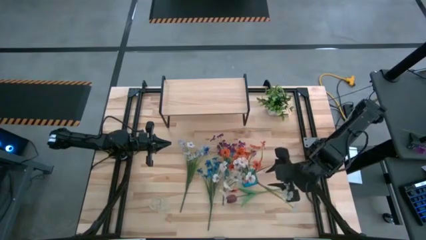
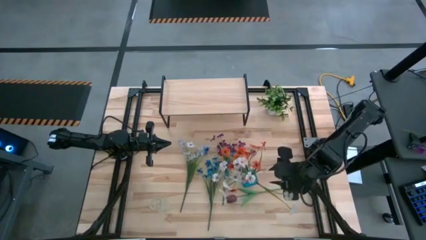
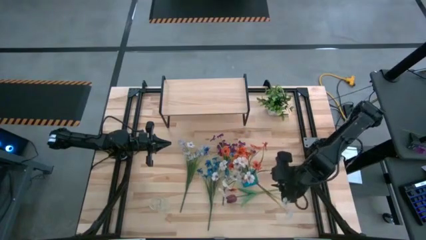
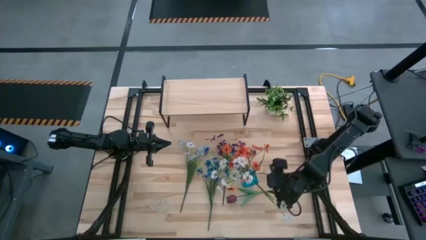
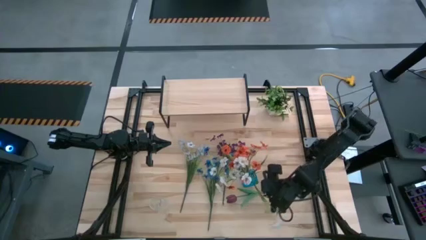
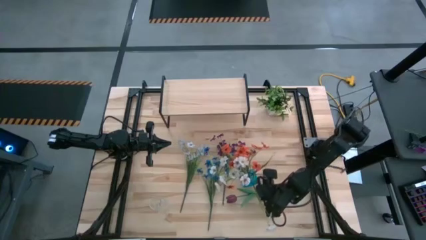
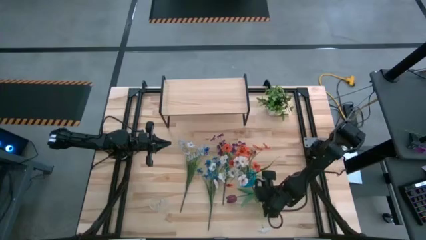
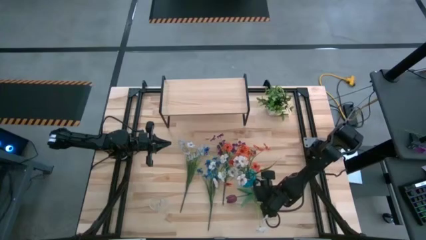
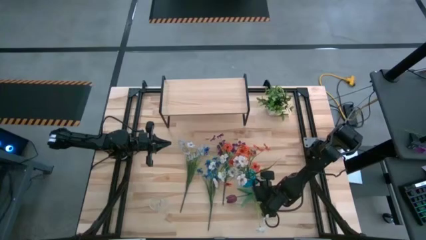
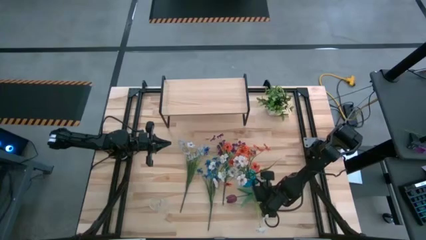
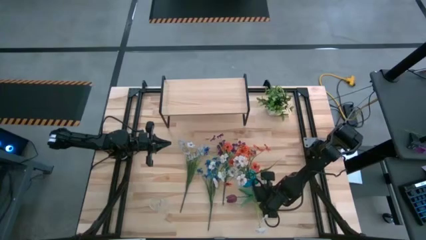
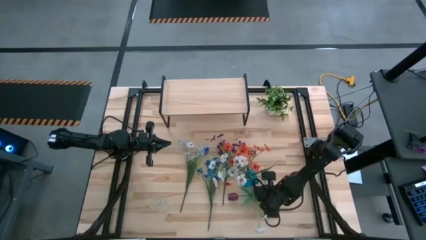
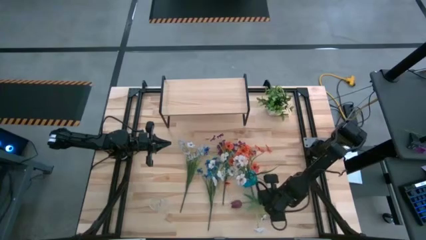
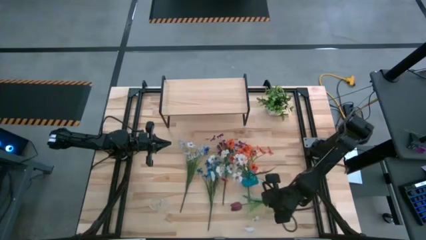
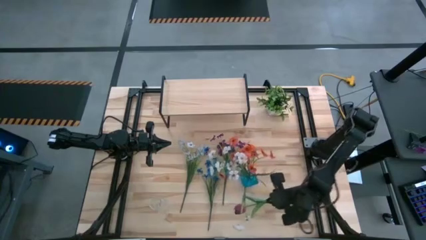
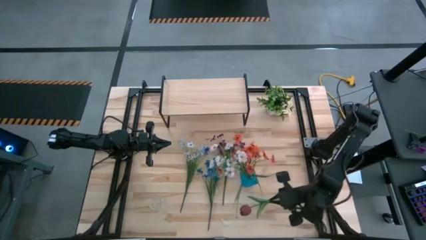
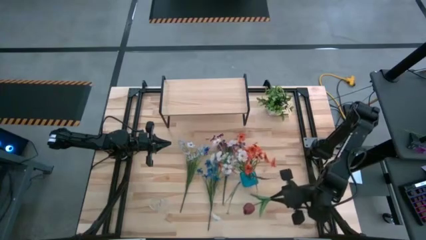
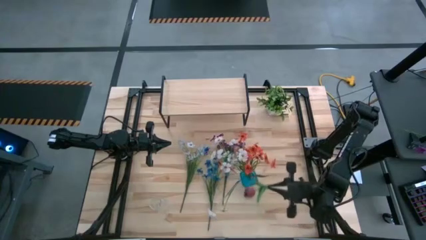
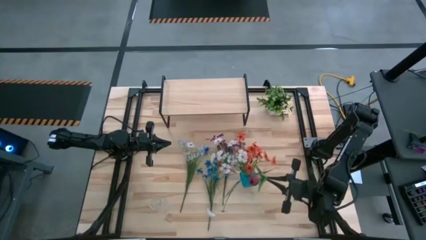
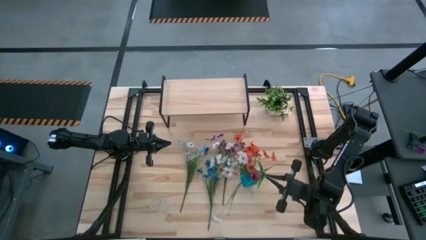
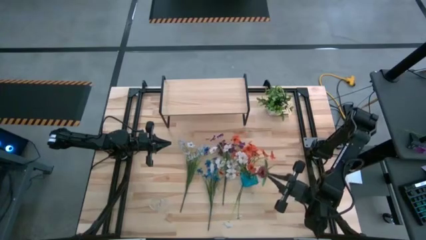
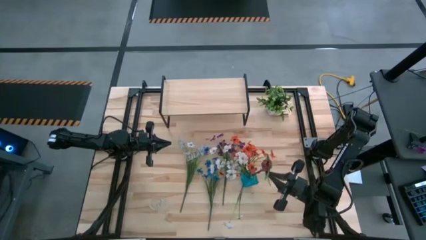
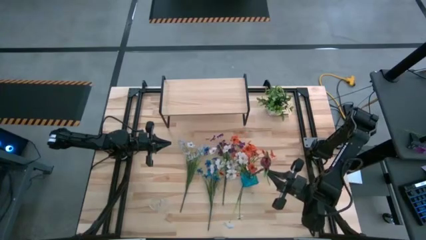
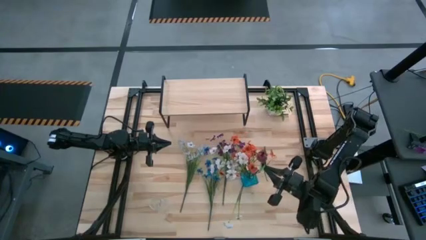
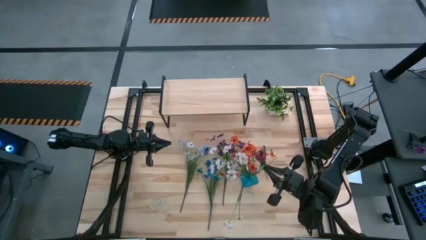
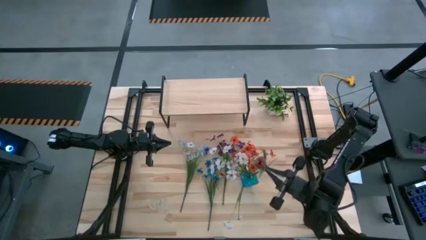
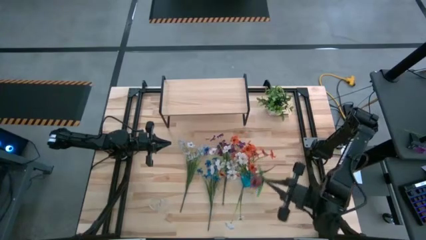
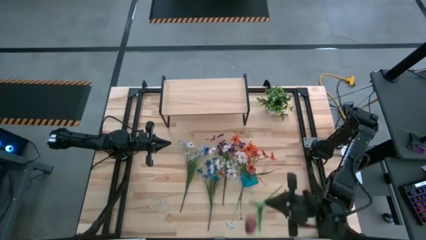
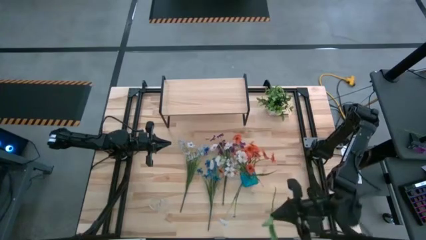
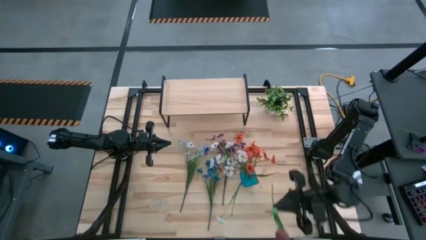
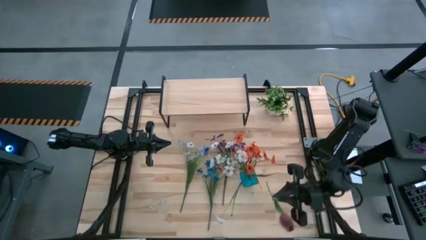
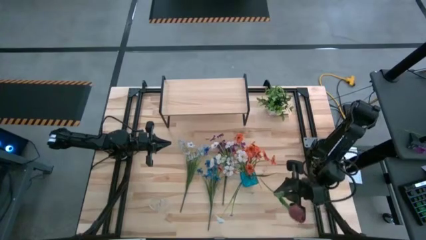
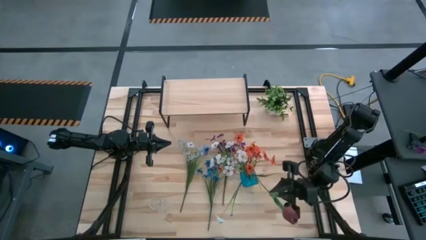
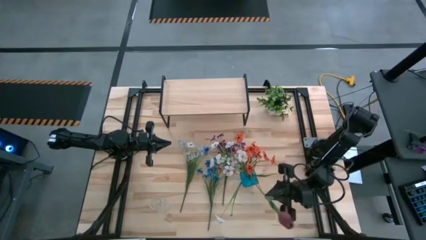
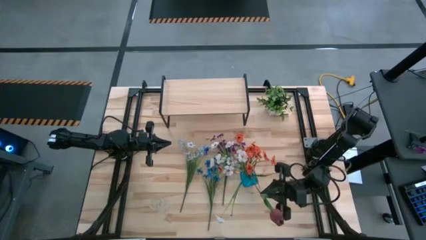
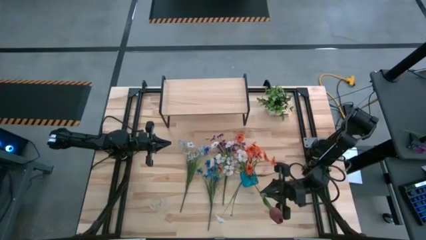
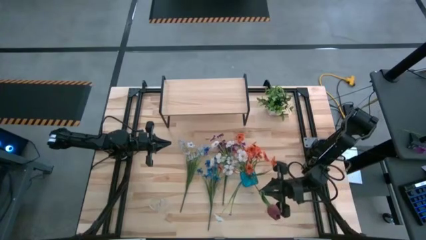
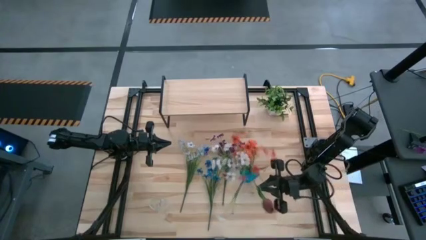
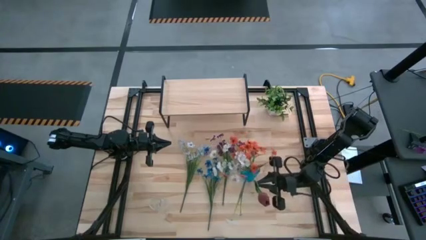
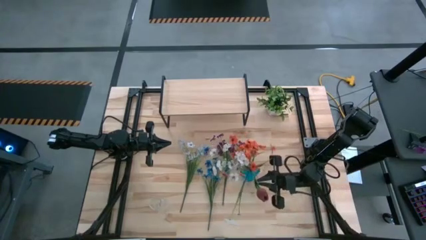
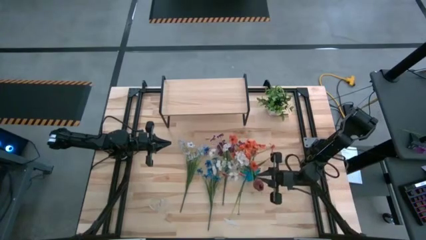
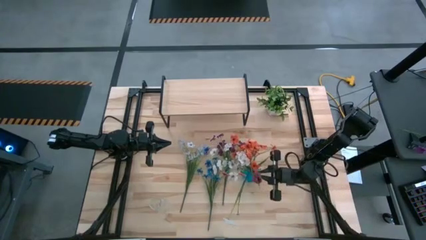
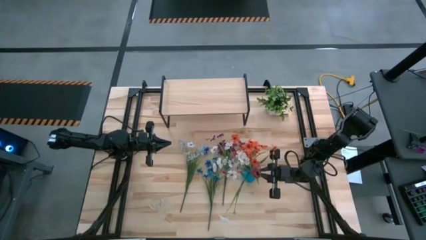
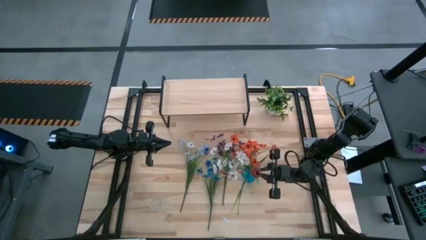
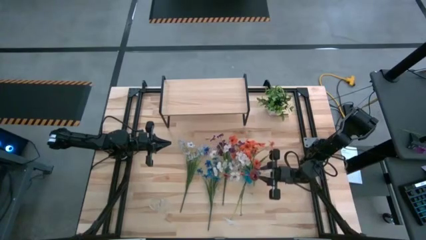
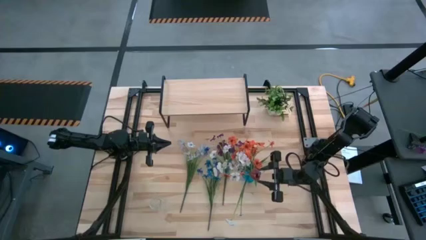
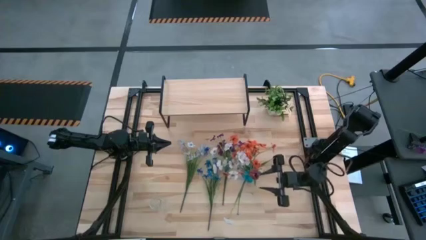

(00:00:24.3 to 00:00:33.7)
Task: Pick and place flowers into a vace then onto a shelf
Put the red flower into the blue vase

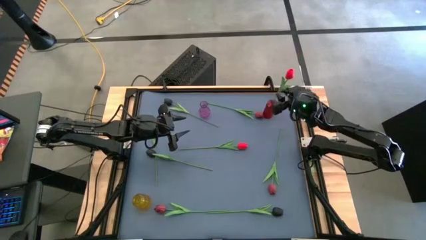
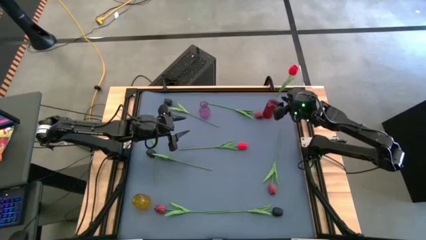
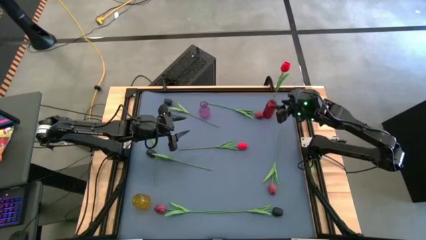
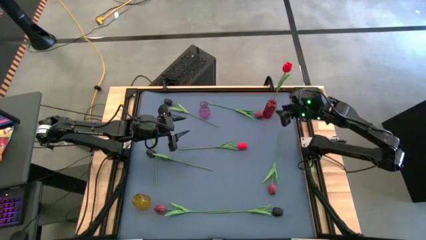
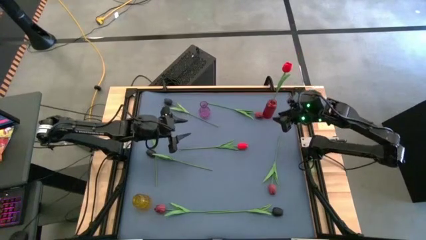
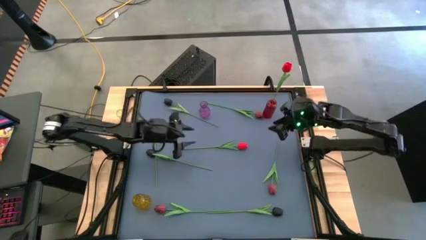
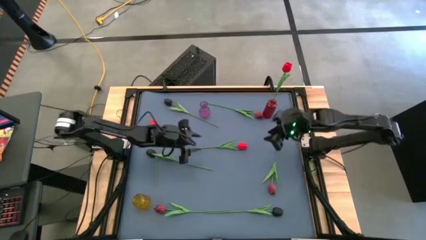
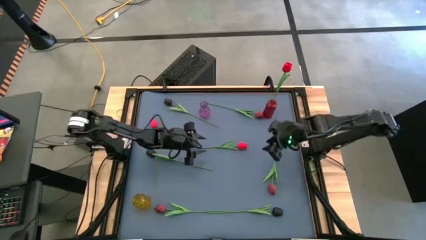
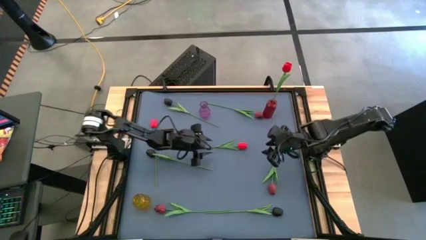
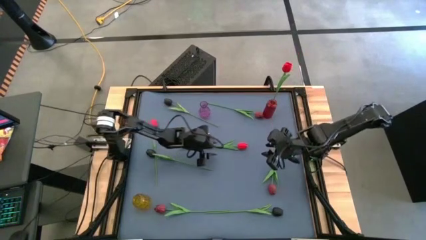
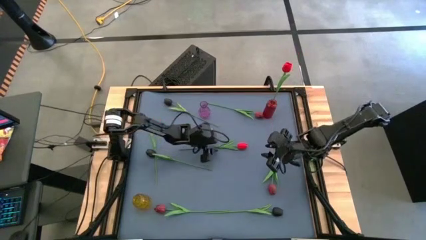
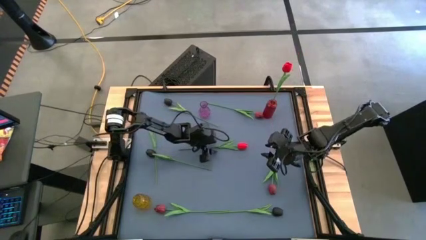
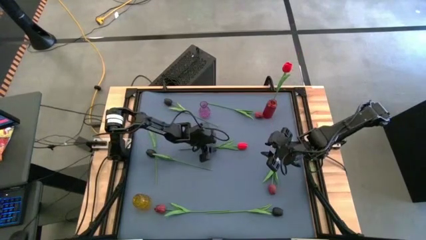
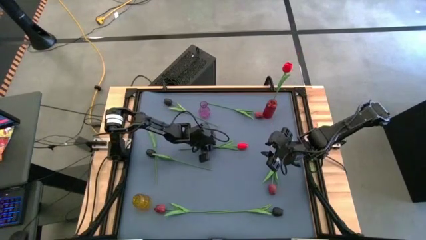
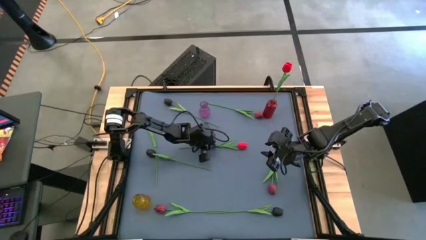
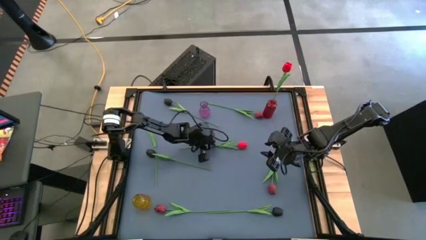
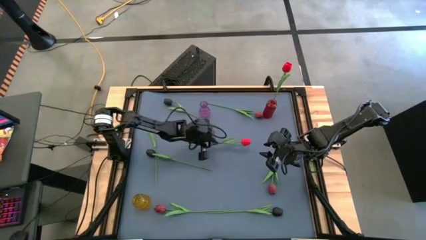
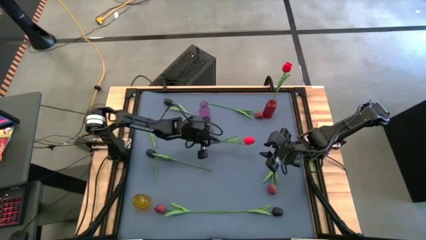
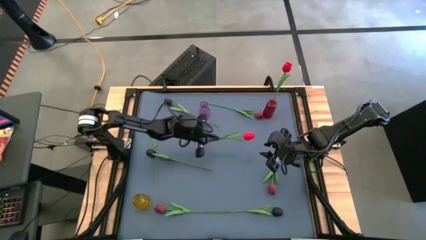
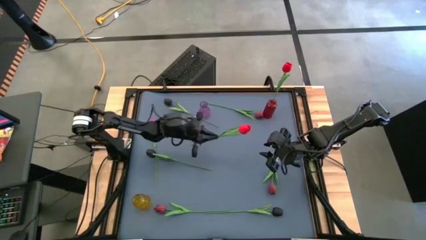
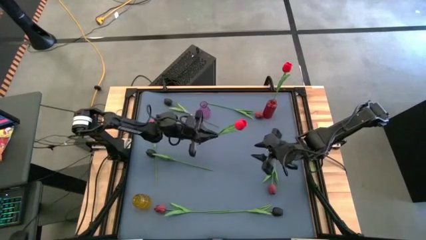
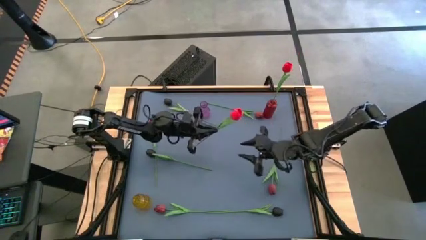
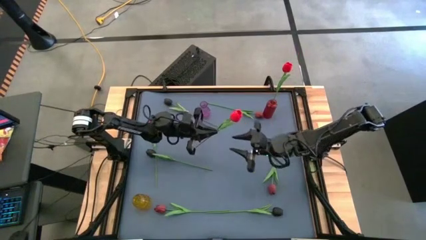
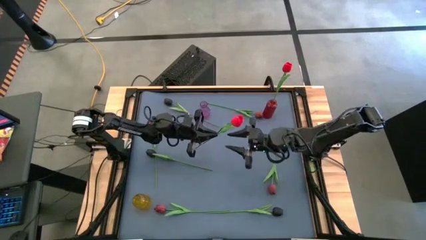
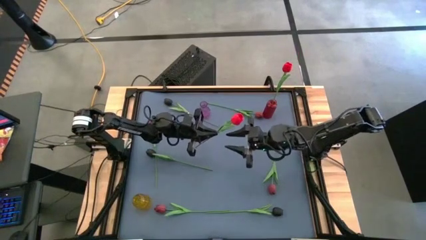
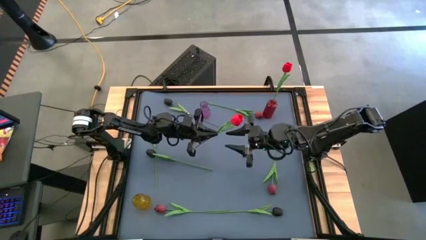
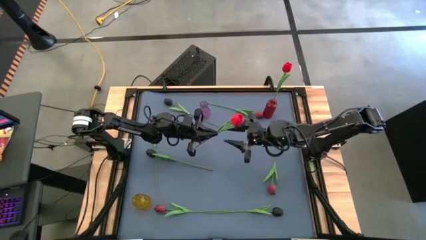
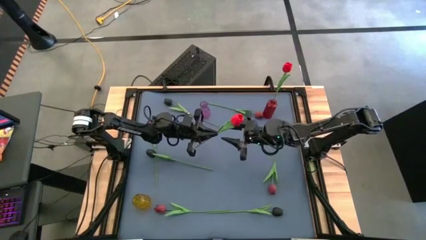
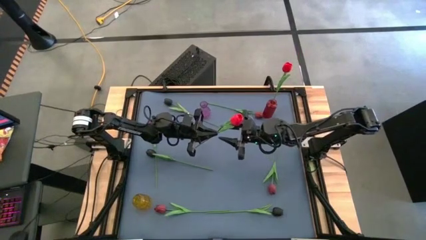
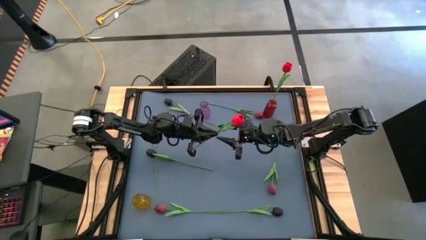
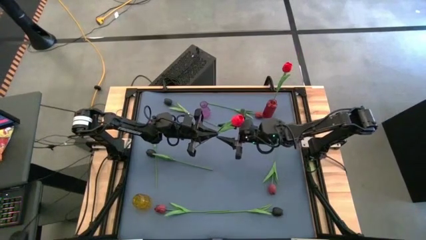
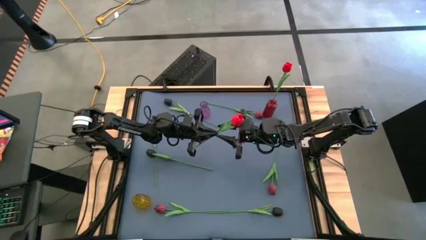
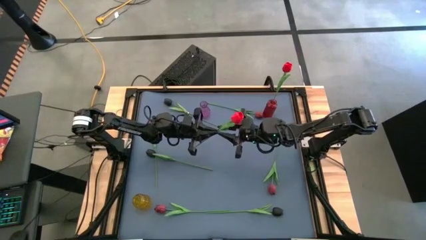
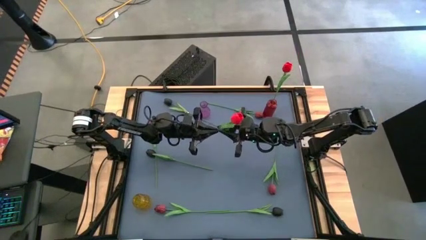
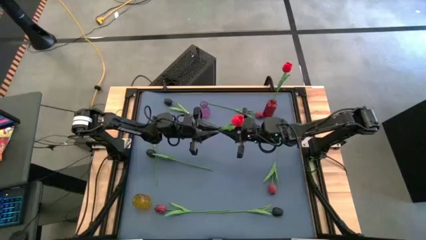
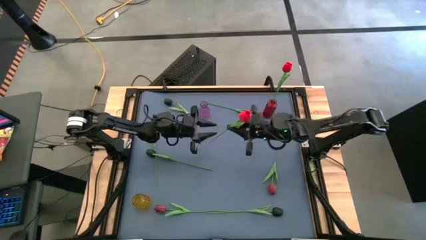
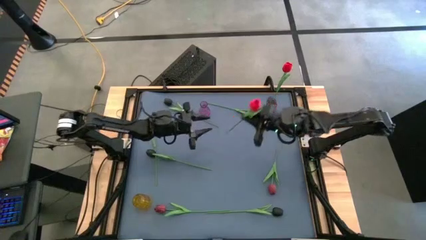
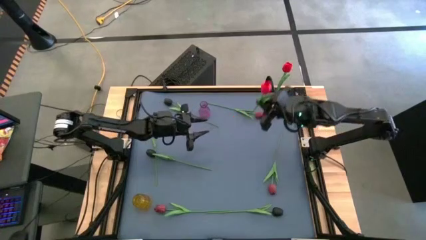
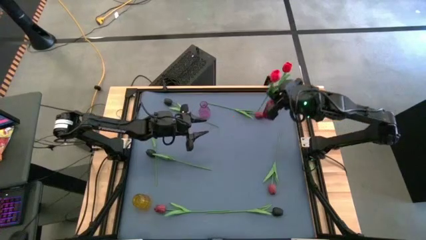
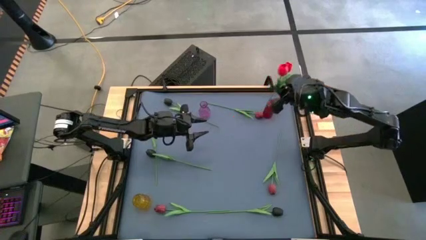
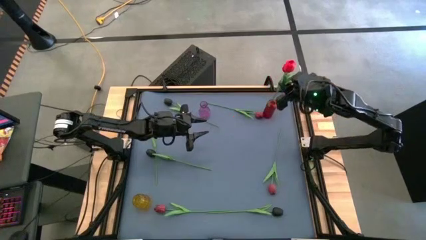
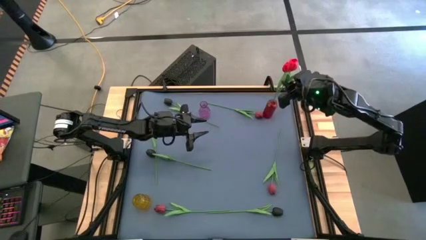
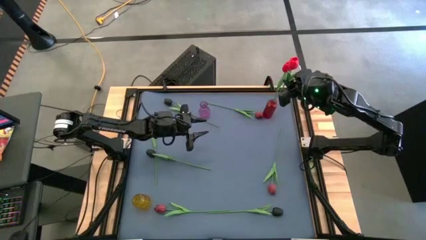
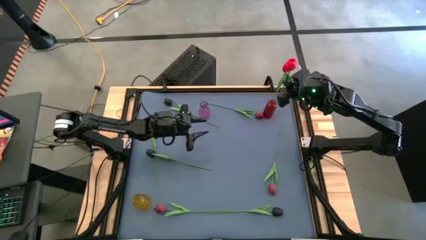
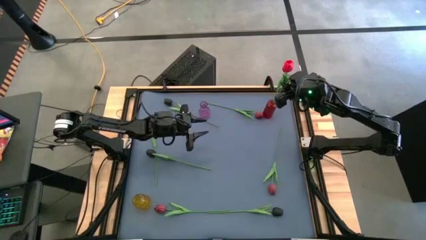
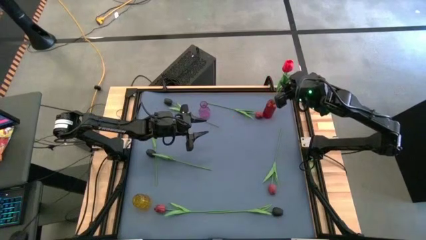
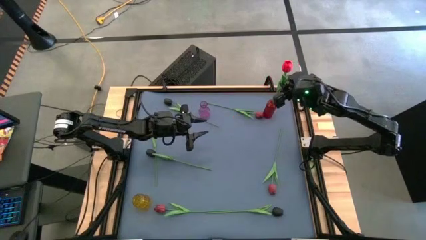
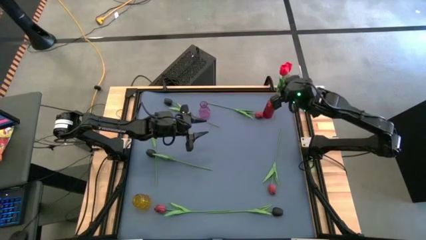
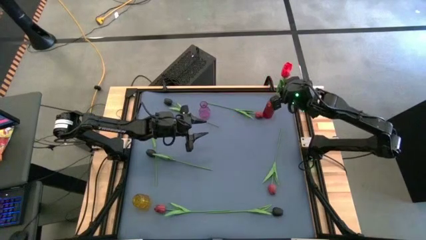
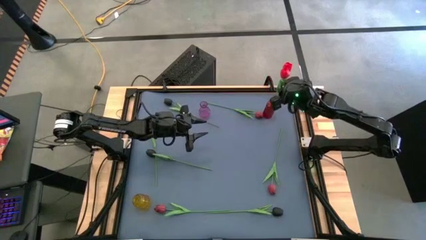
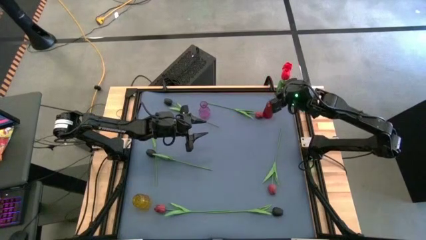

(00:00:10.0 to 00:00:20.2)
Task: Sort flowers into vase by color
Put the right red flower into the red vase
